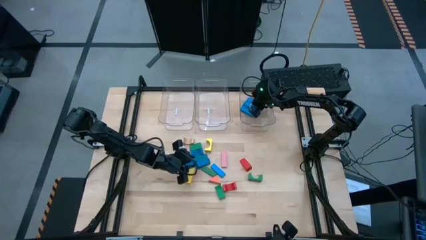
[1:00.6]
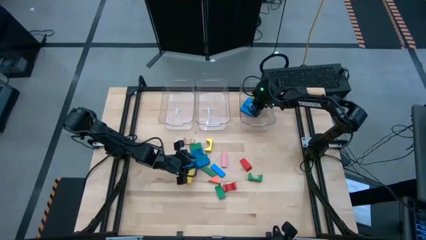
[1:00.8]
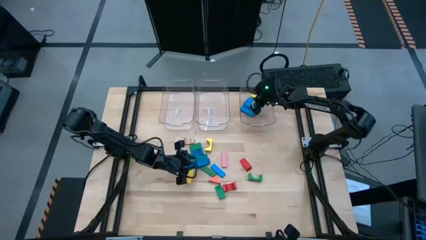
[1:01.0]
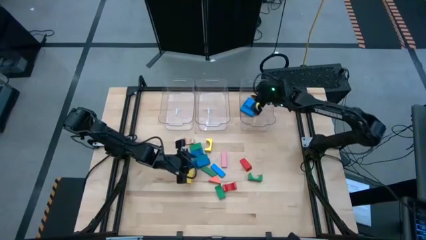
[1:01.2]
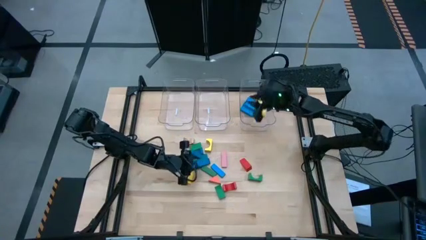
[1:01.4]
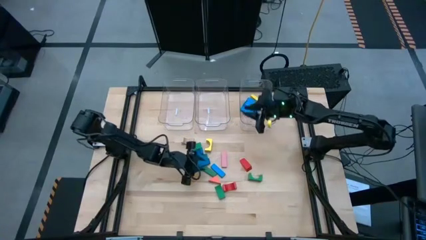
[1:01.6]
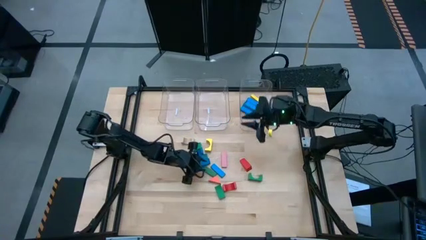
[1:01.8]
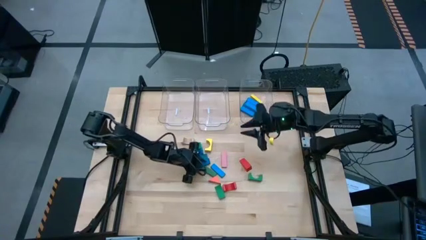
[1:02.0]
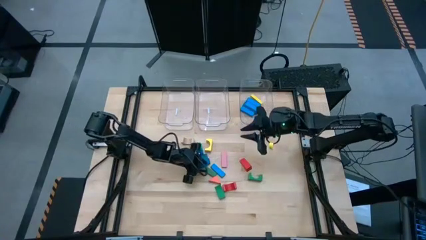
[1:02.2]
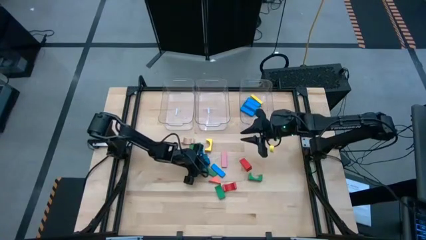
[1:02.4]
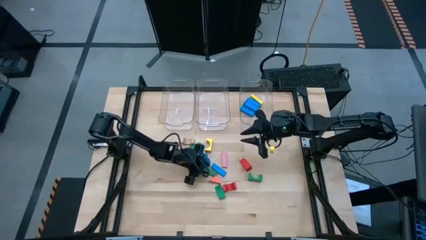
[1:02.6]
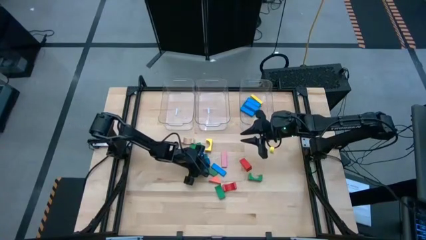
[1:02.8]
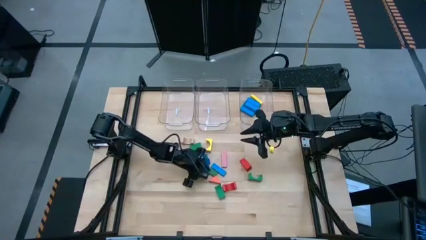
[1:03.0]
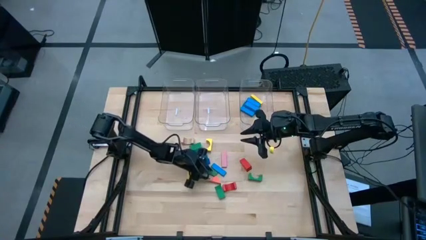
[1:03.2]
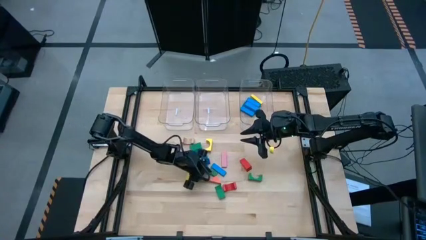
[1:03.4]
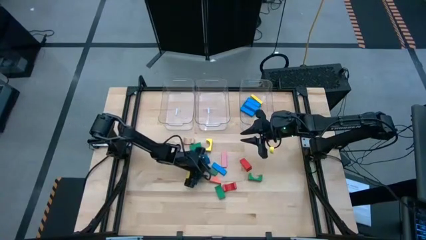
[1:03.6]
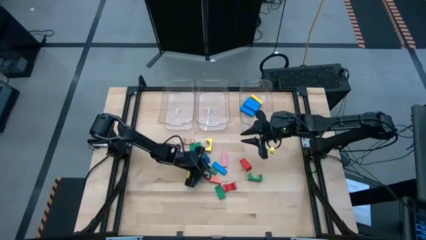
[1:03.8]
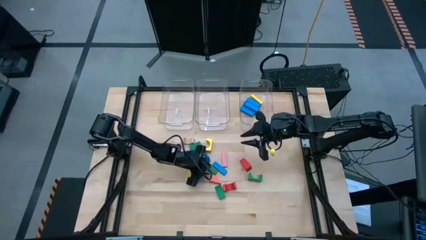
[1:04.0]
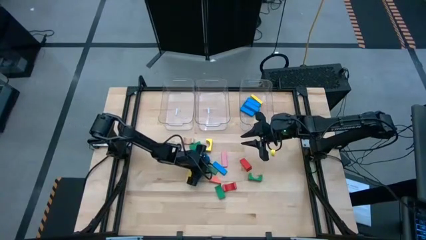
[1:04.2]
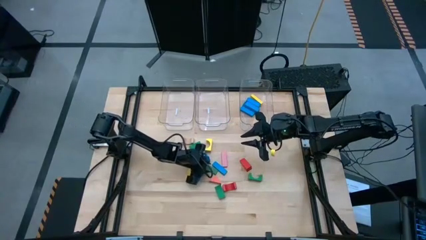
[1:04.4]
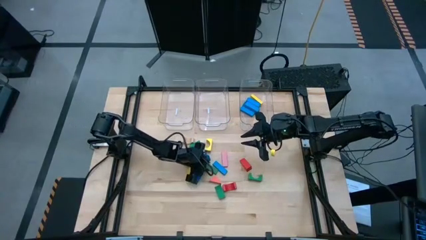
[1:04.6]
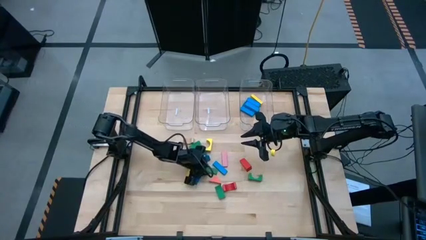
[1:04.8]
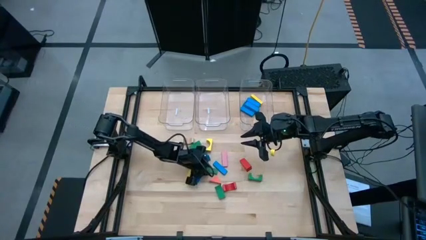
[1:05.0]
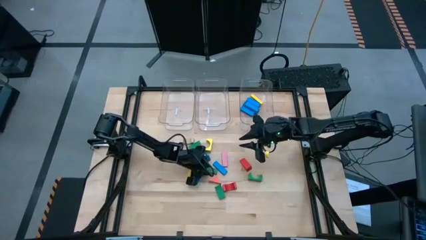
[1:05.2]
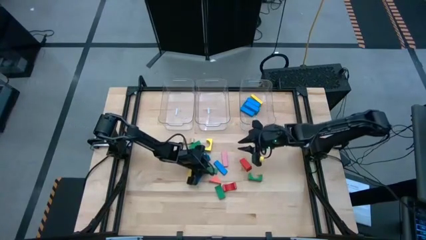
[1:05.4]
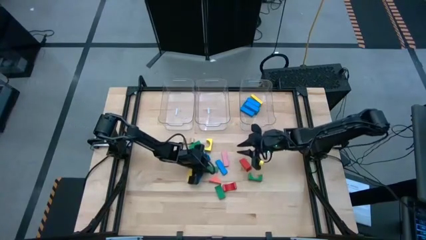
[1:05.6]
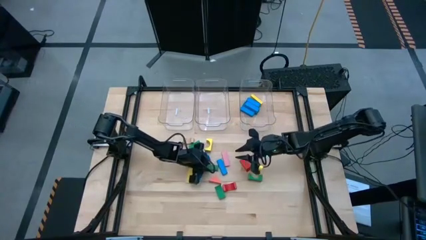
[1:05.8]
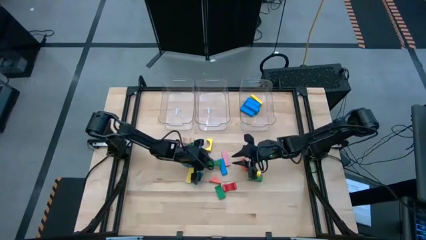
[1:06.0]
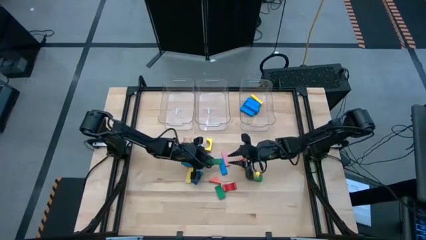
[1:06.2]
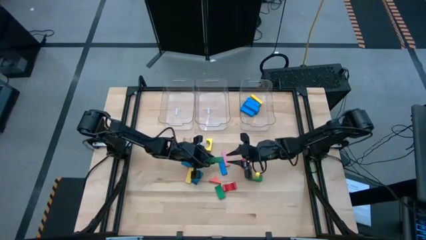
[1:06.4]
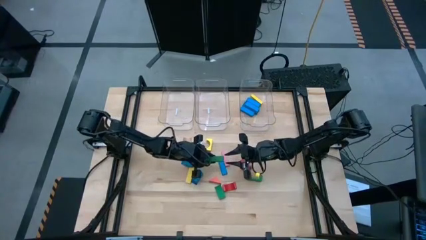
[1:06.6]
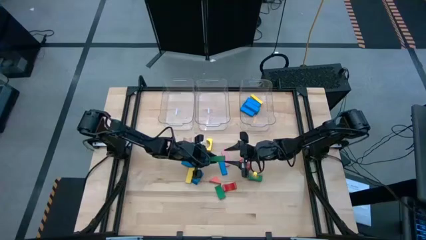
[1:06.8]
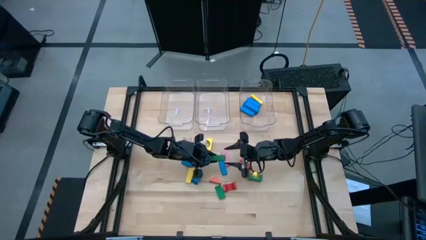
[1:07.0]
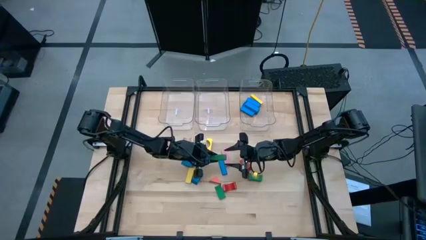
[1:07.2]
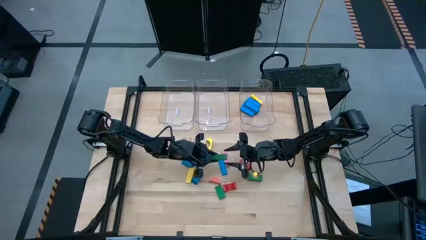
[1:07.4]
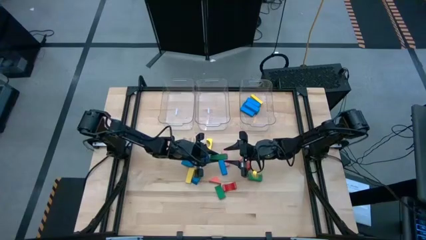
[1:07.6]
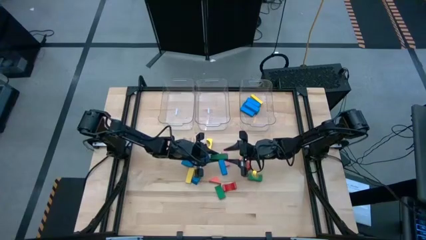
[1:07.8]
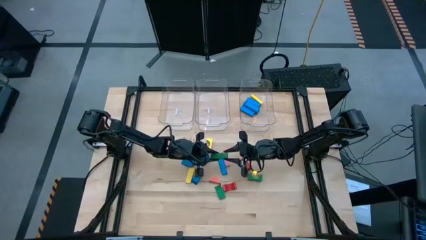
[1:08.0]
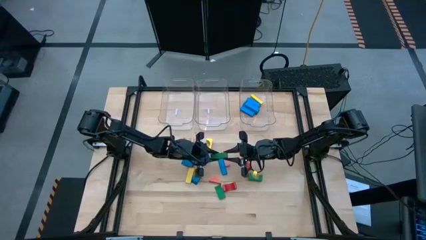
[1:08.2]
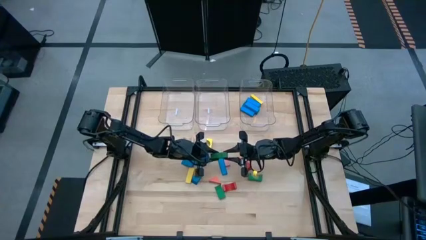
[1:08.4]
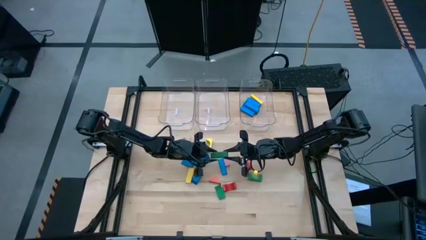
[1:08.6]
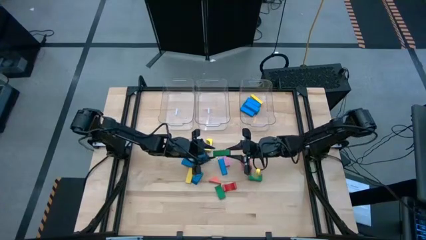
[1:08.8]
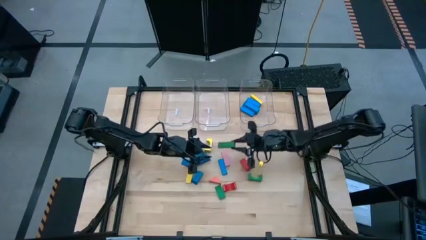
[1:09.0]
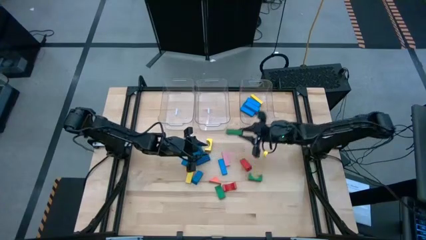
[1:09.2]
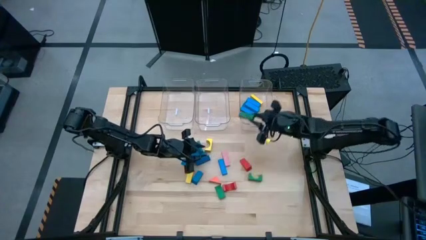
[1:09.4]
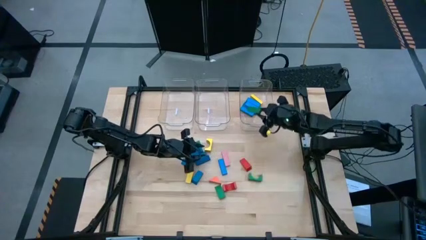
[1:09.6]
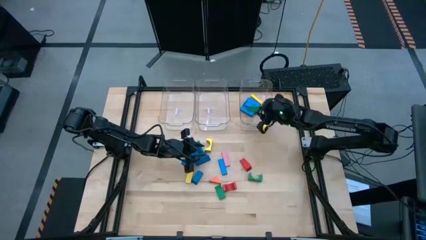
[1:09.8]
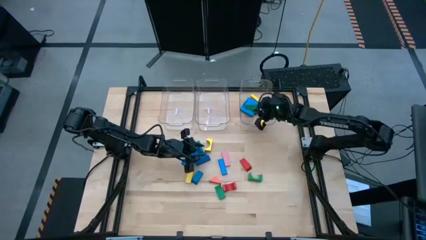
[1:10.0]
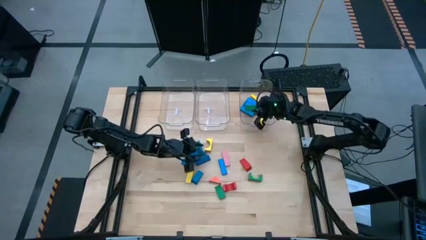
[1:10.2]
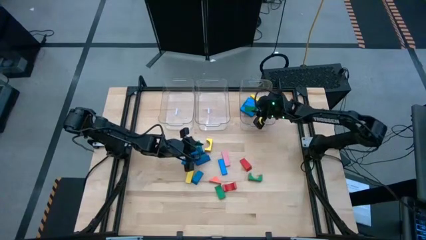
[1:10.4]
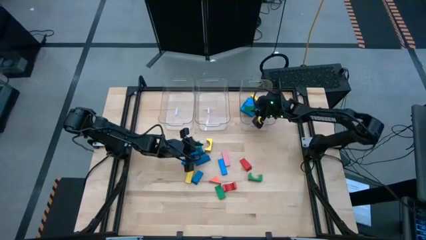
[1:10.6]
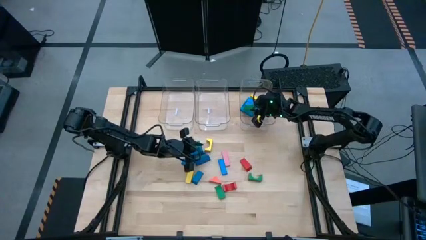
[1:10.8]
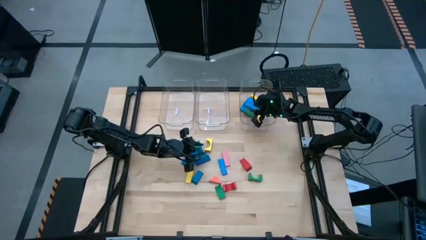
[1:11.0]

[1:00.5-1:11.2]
Task: Sort blocks by size
Put the green rectangular block into the right transparent bin

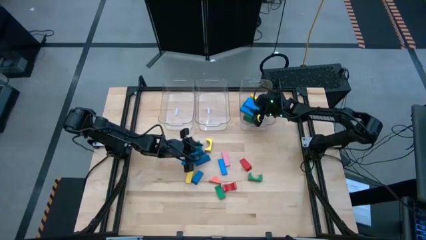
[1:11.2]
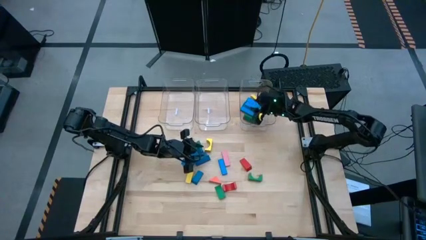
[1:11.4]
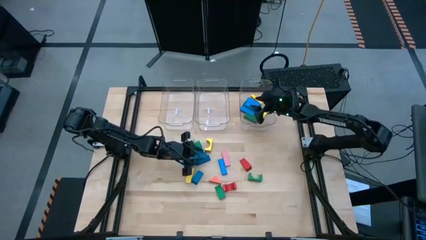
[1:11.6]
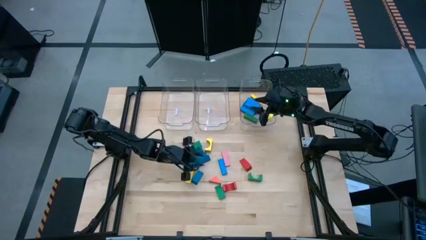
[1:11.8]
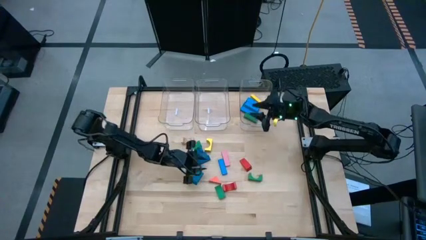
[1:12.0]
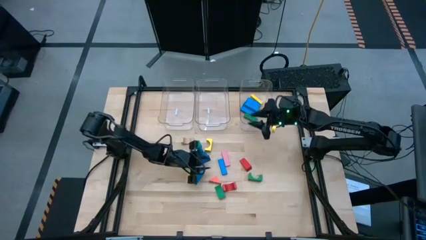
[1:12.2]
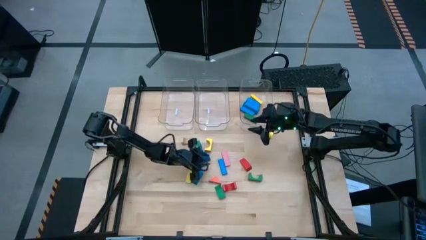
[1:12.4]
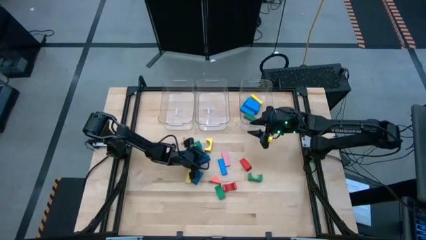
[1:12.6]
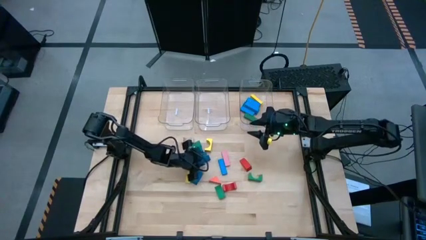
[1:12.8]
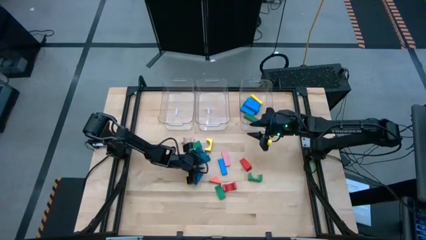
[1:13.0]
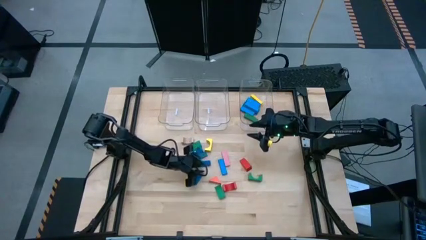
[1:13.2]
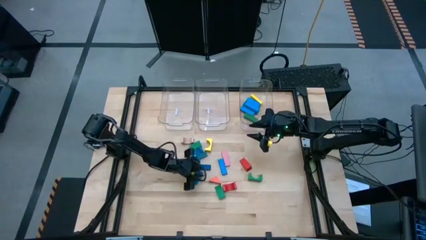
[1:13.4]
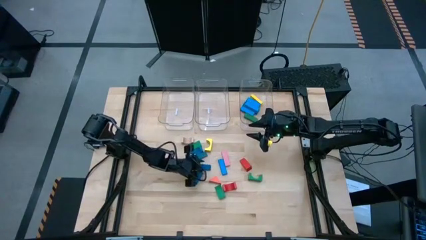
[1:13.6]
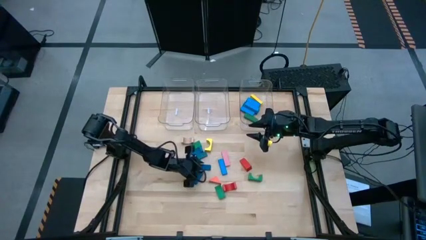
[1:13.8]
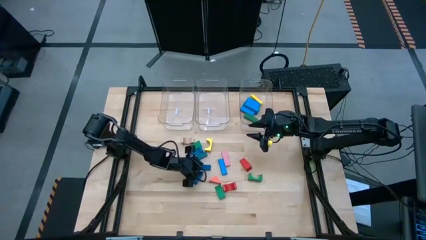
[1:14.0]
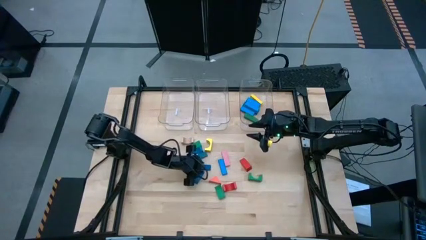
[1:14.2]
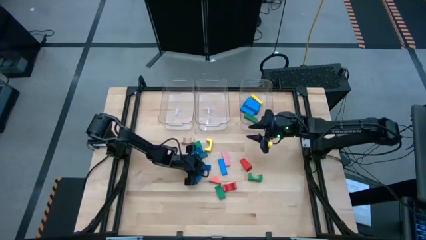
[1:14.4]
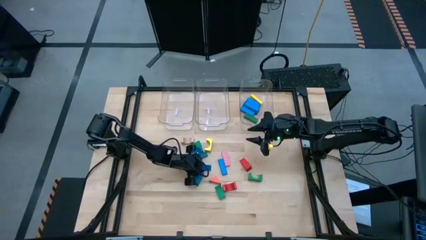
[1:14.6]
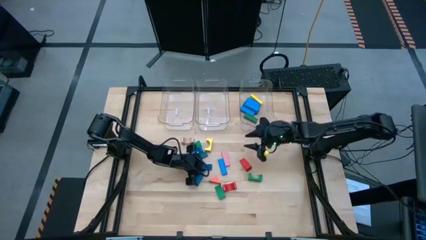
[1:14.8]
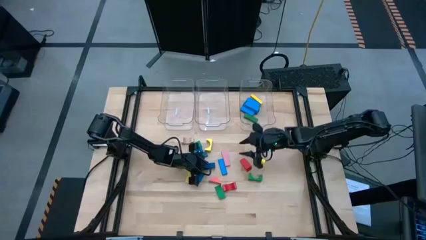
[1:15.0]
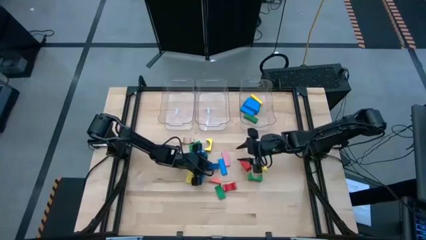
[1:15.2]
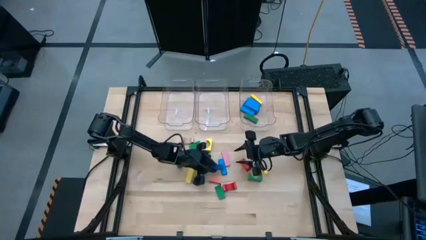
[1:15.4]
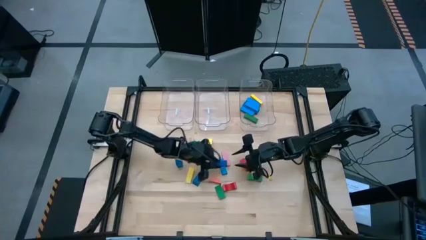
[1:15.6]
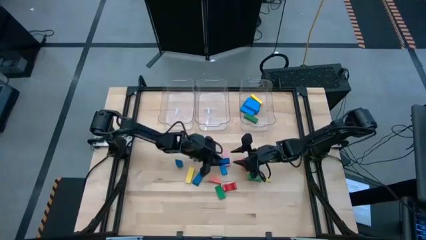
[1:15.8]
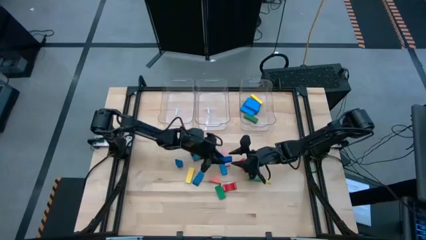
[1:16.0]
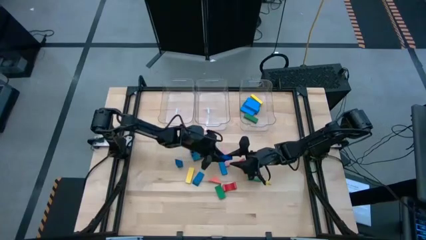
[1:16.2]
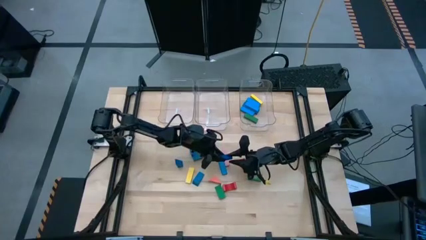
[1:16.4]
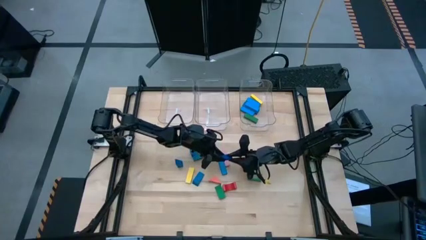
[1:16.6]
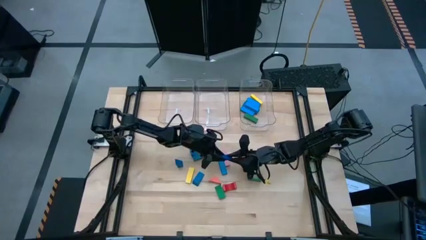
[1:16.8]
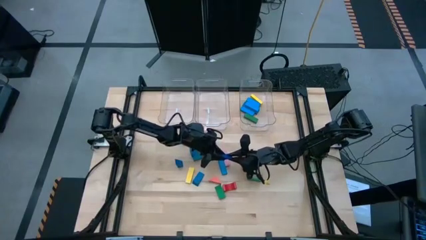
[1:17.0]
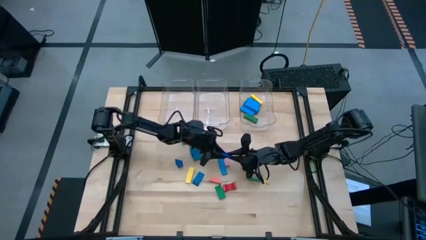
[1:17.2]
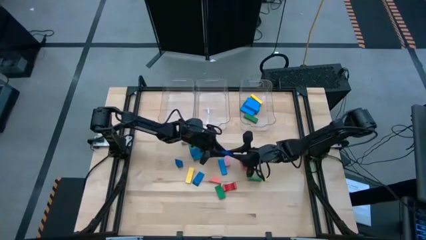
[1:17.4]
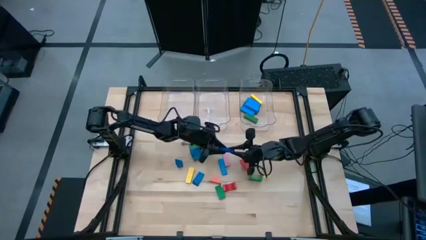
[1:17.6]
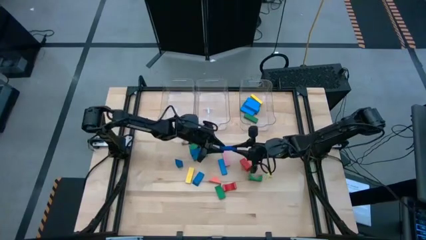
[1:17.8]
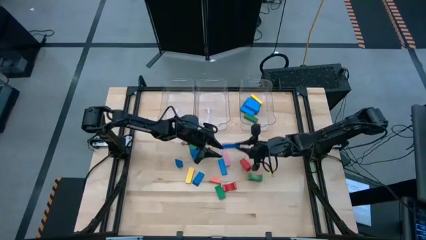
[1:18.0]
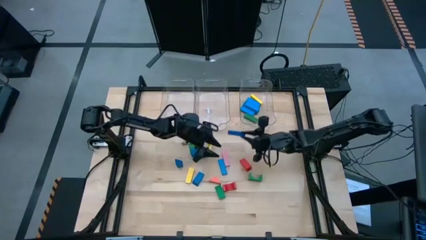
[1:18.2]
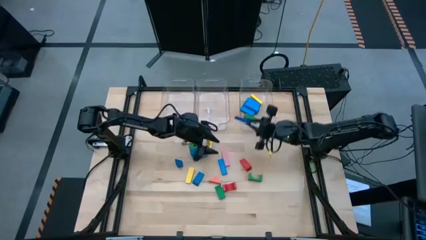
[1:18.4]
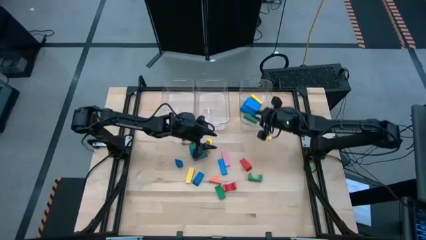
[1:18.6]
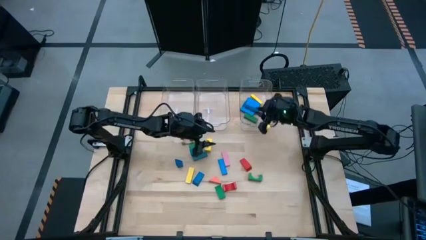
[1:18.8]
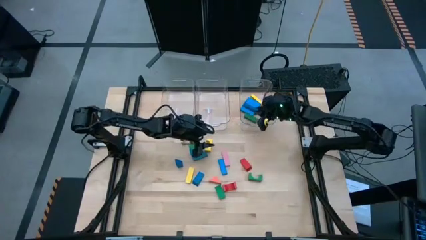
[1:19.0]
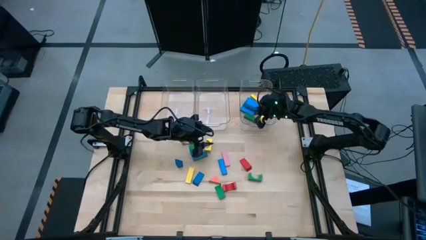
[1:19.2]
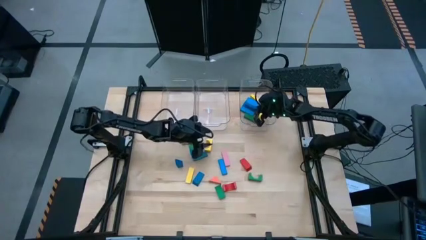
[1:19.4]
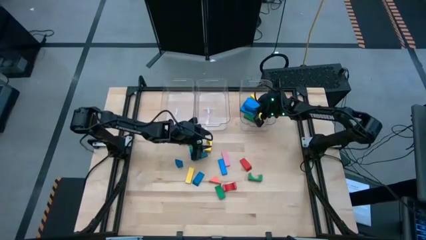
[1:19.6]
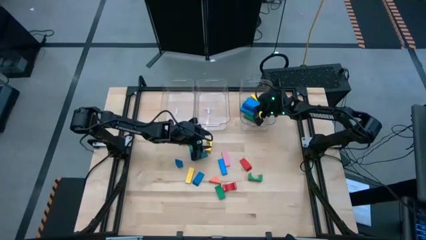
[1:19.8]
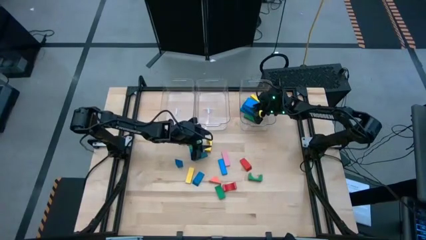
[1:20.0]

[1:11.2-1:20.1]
Put the dark blue rectangular block into the right transparent bin
